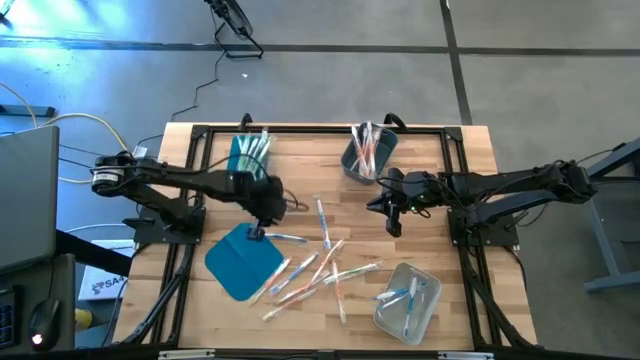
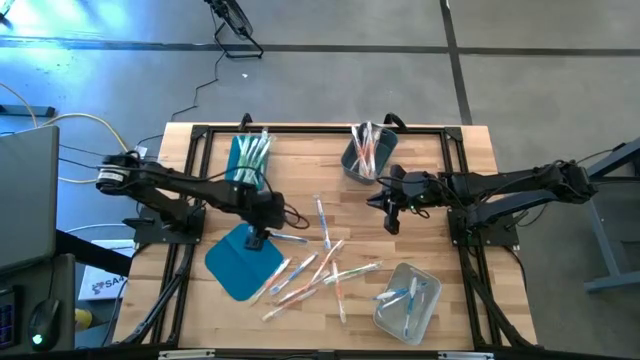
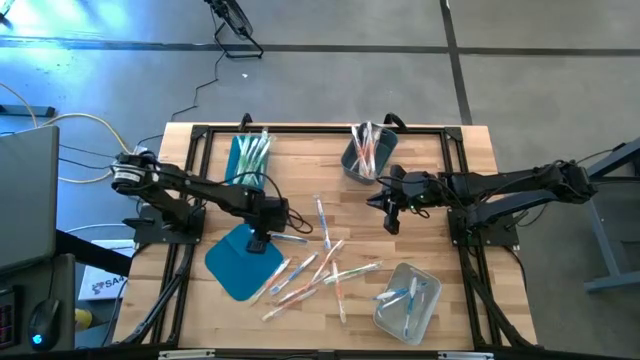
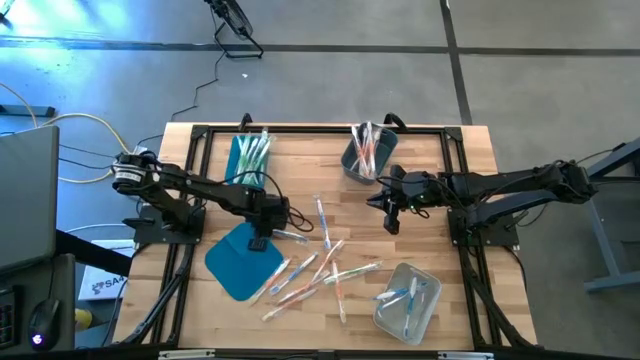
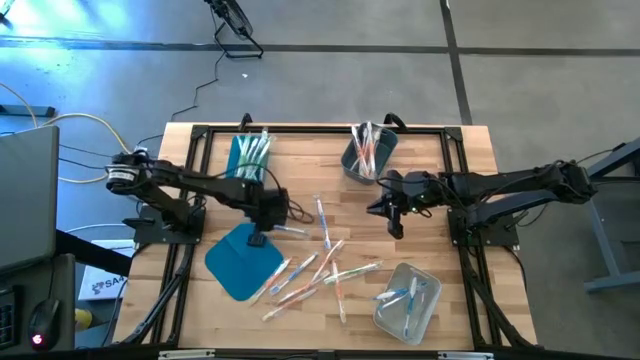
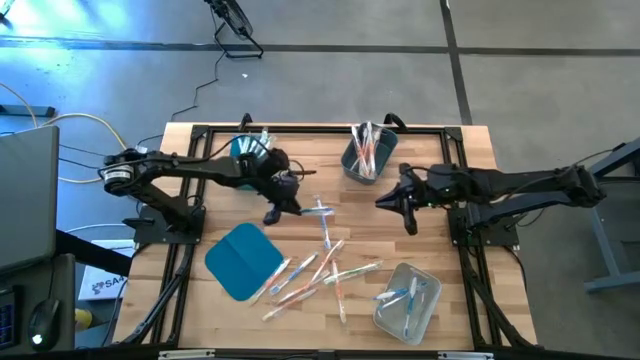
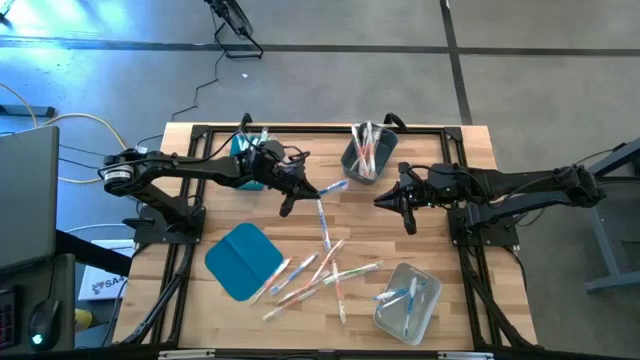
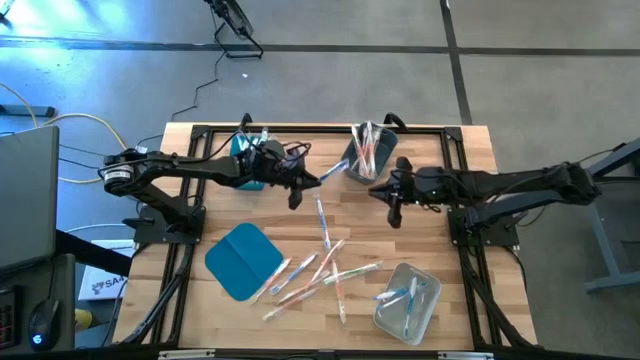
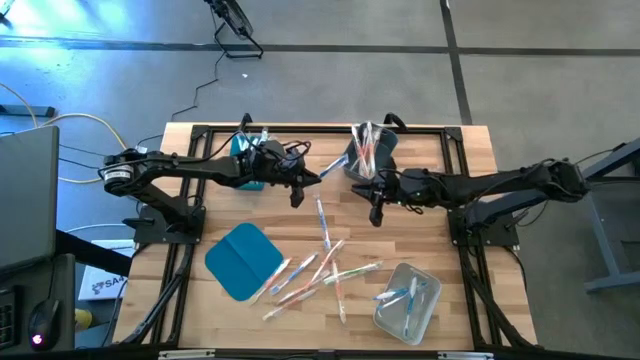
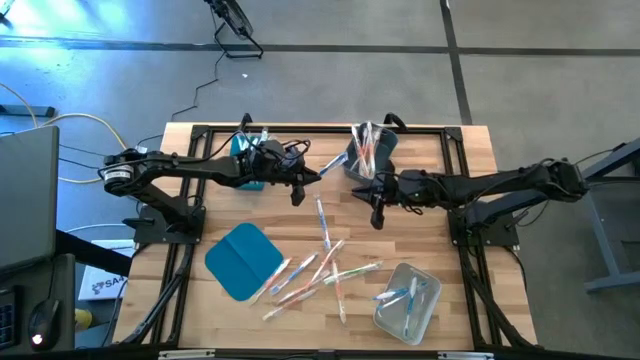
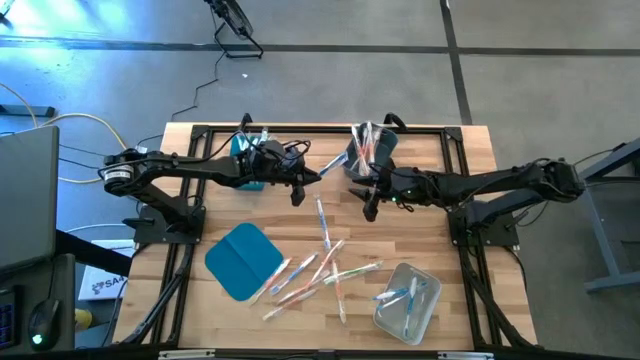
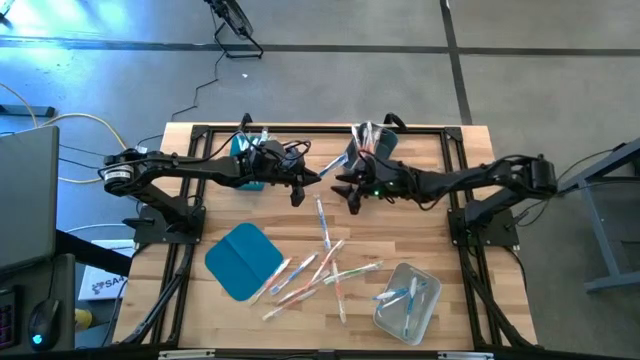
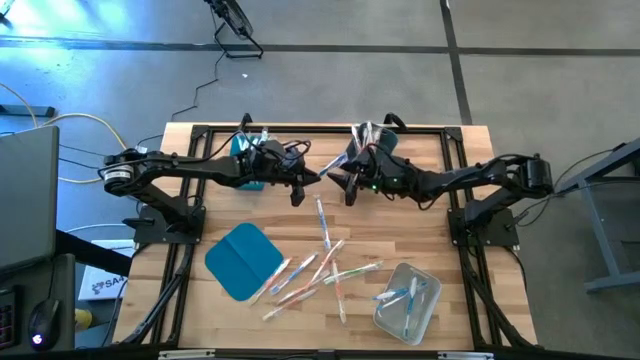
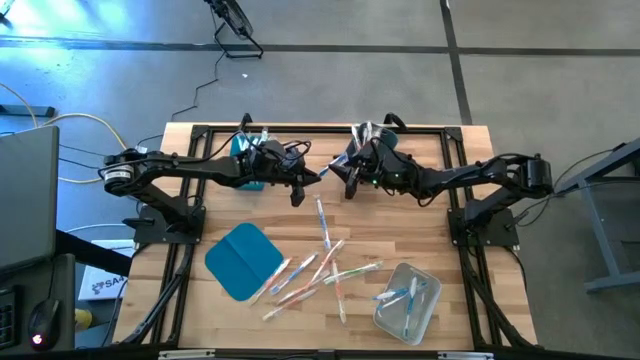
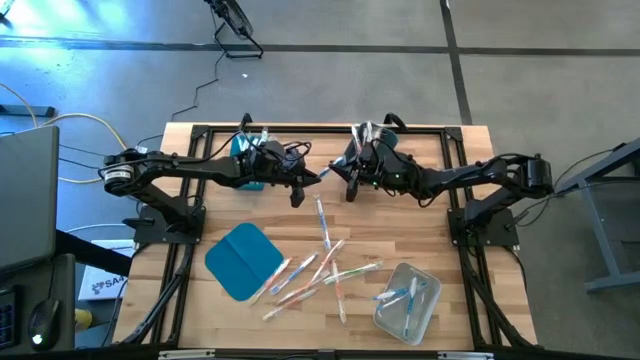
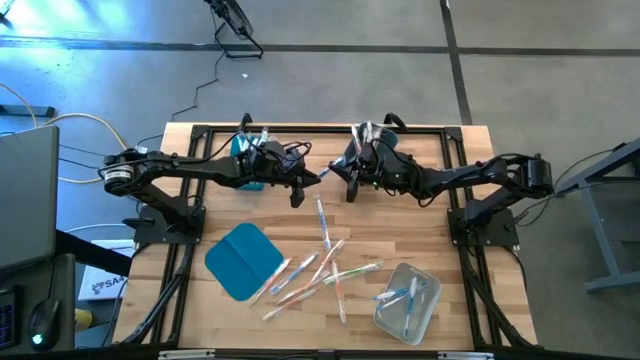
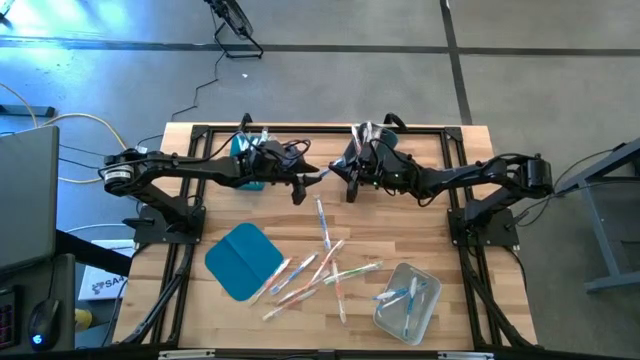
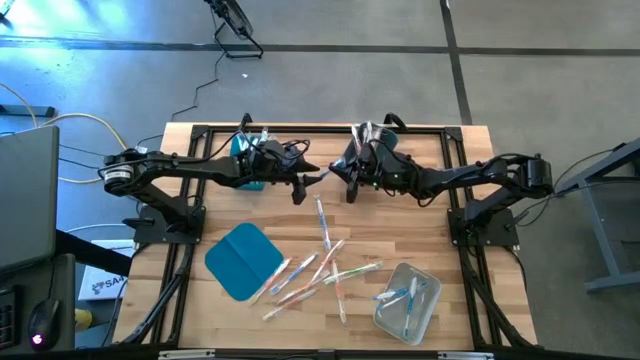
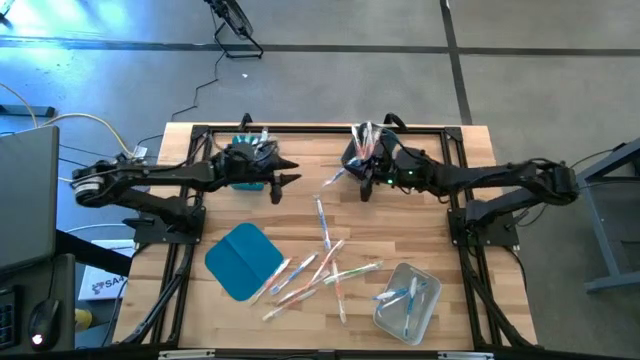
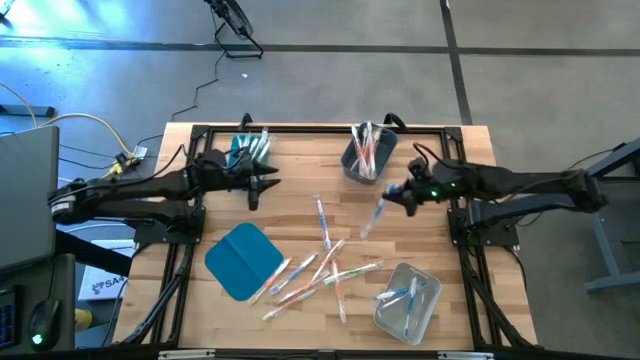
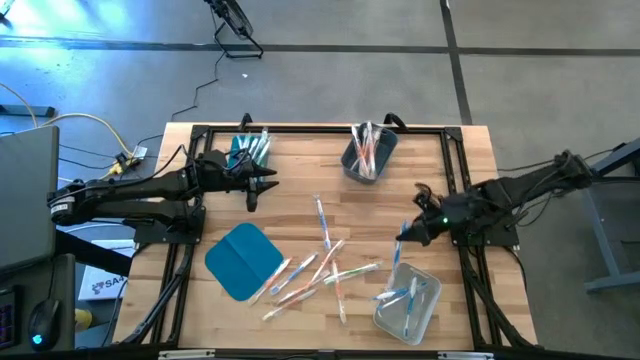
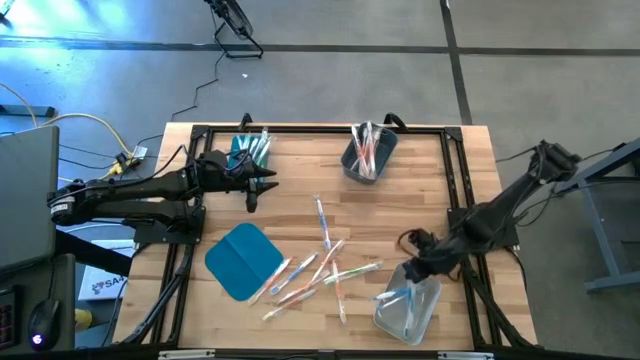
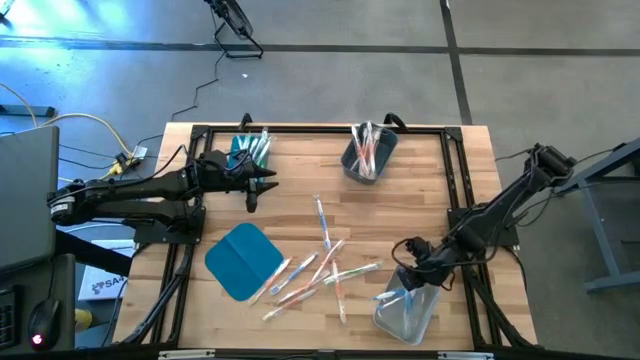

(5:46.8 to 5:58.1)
Task: Pick & Place Toothbrushes
Put the top left blue toothbrush into the light gray bin

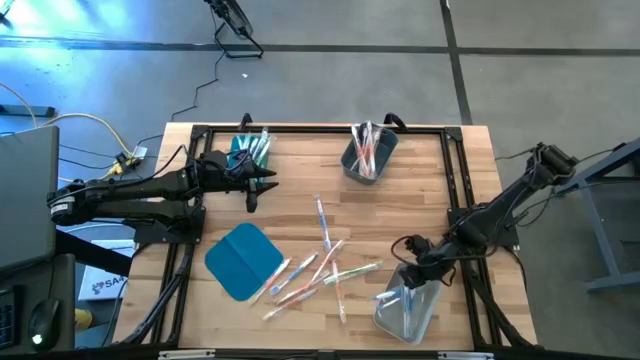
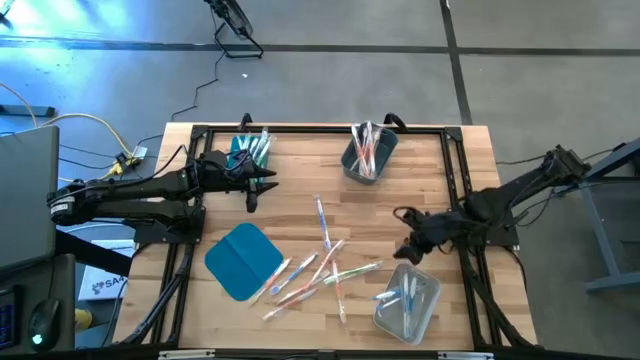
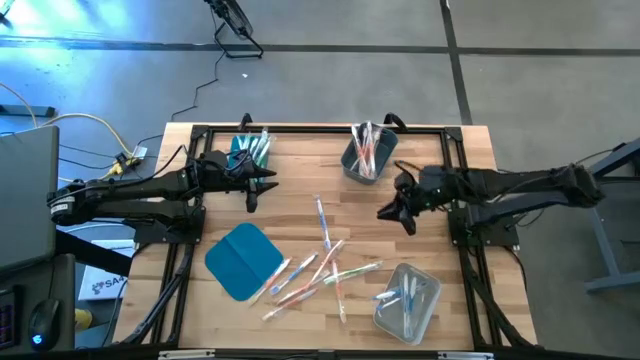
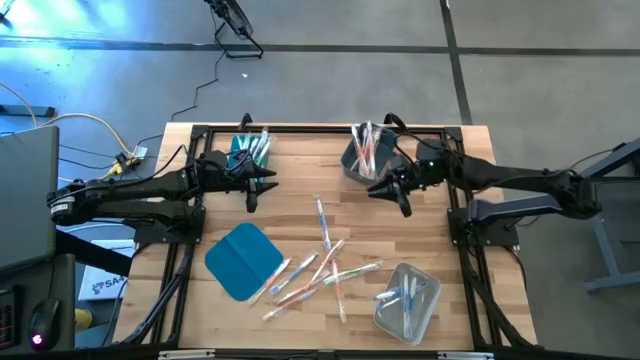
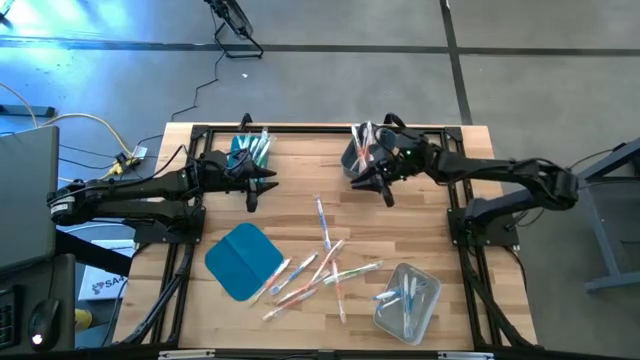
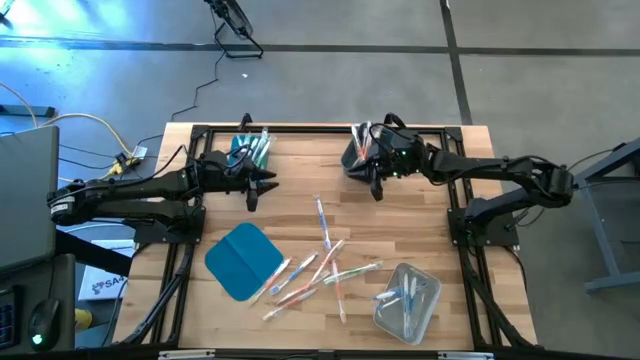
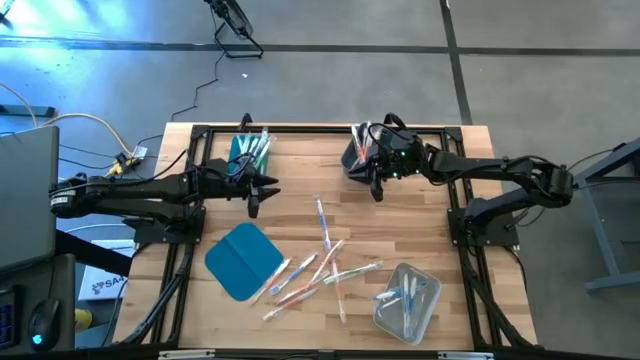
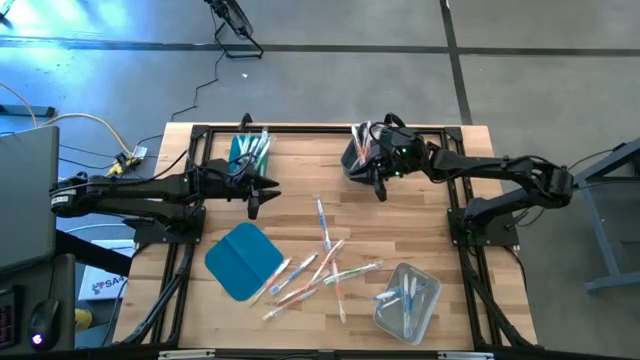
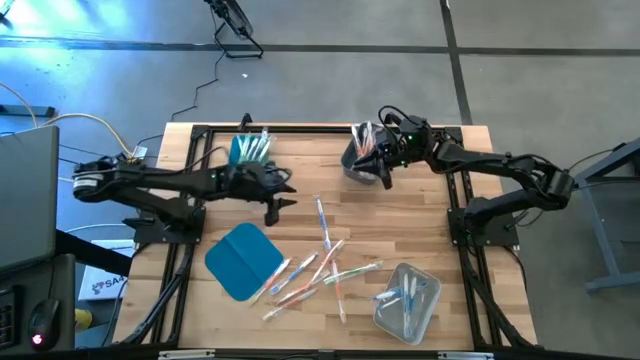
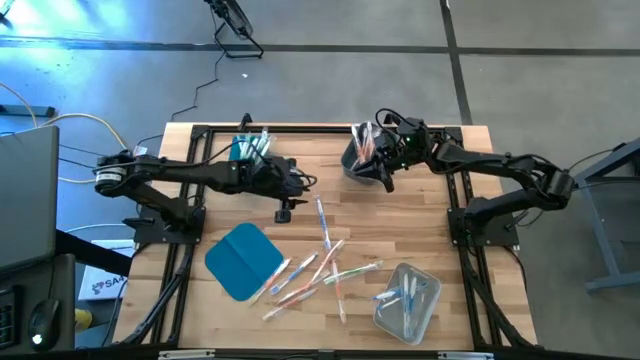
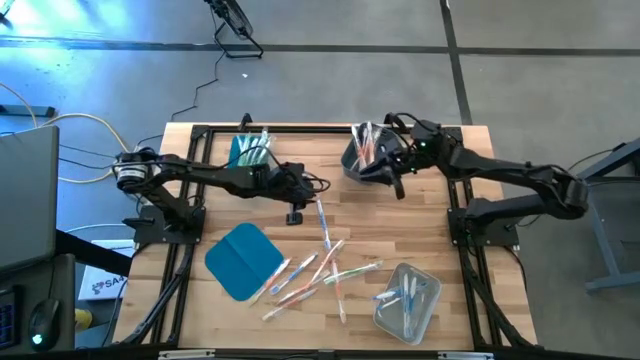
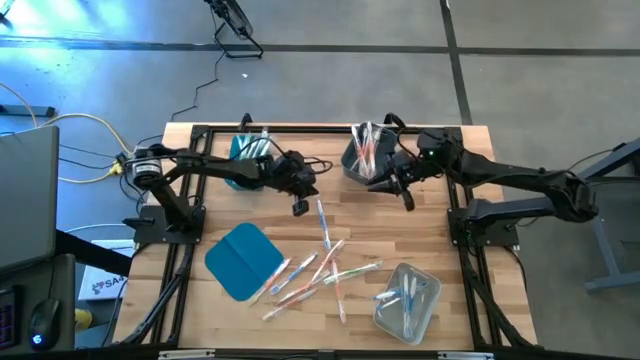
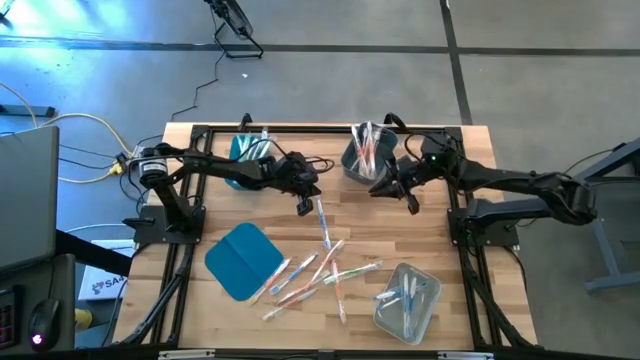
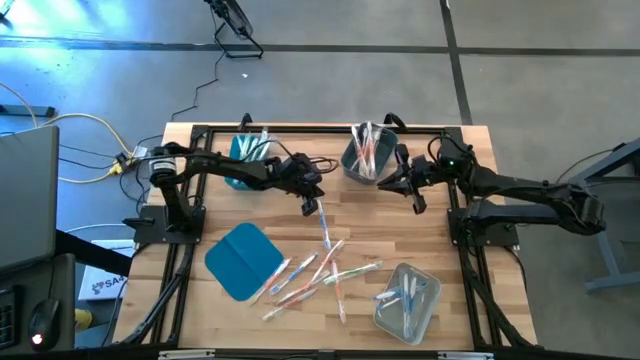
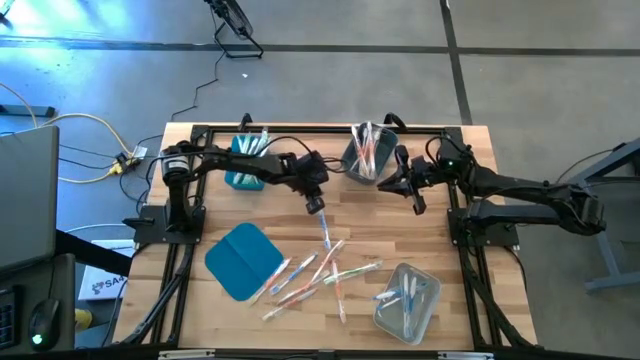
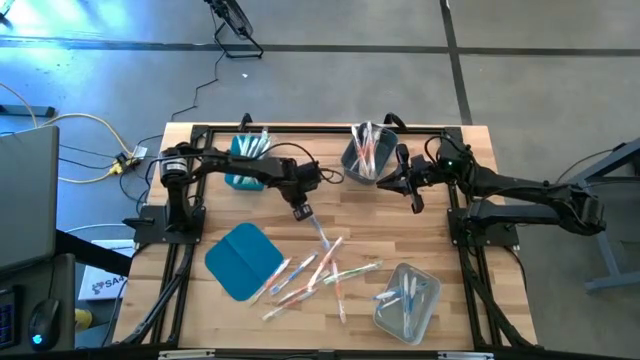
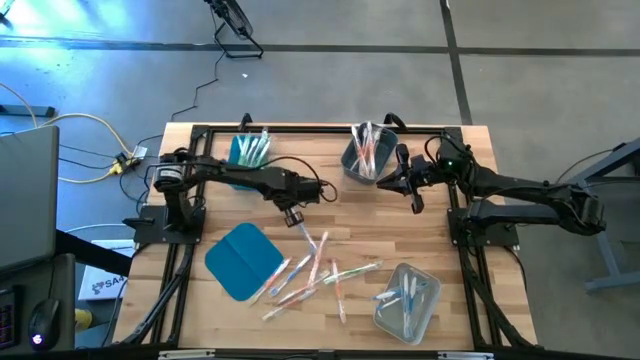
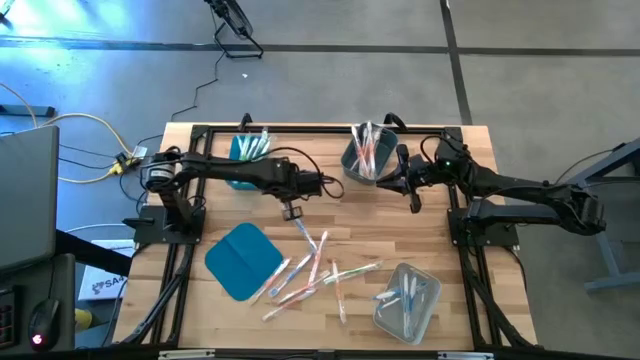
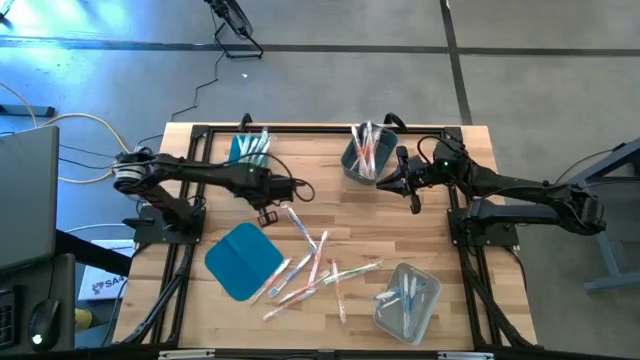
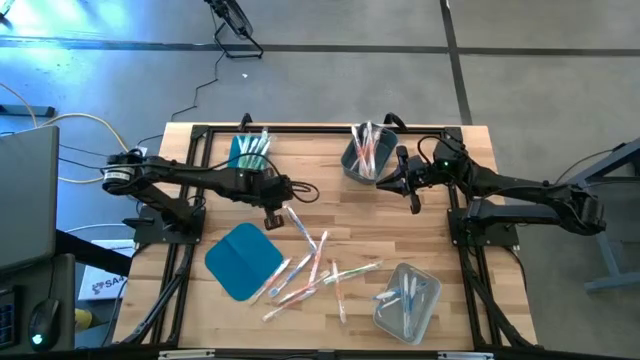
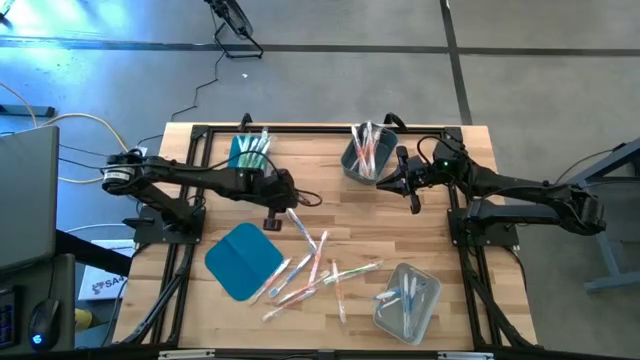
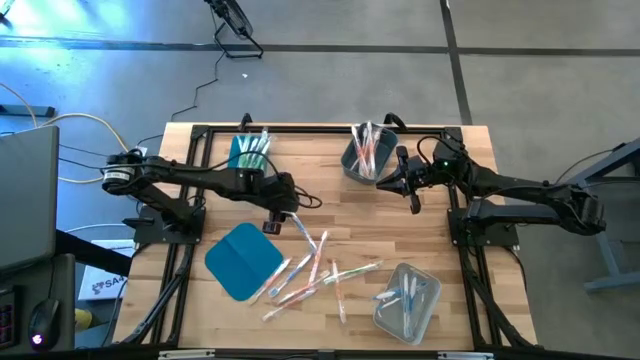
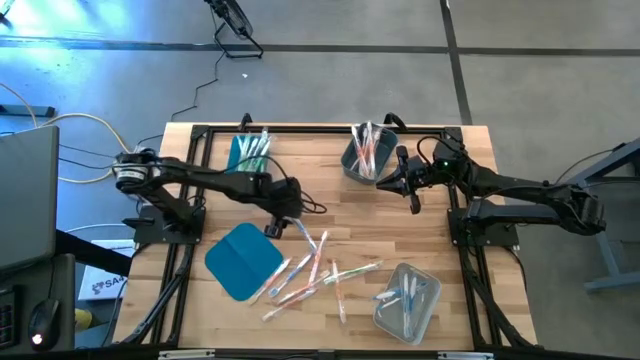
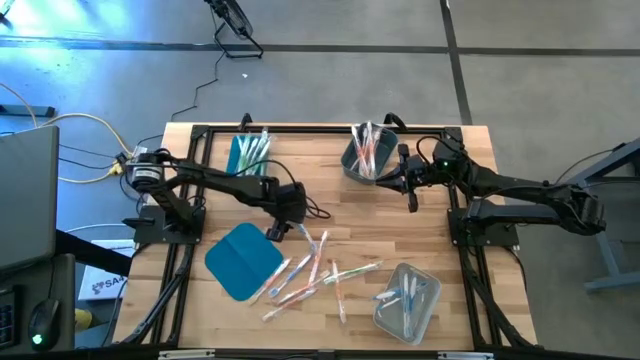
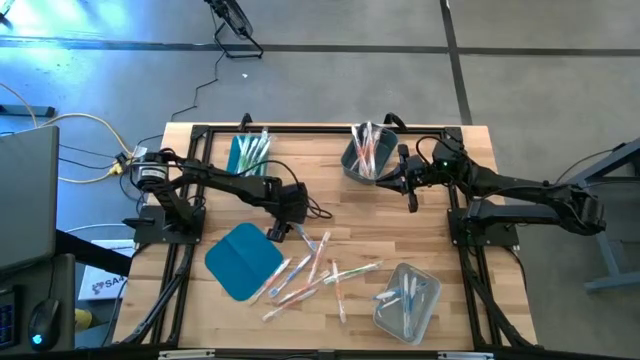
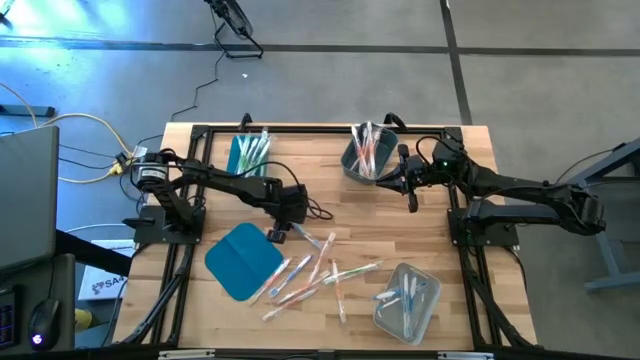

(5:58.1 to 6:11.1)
Put the top blue toothbrush into the light gray bin
